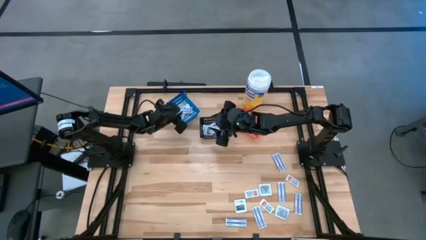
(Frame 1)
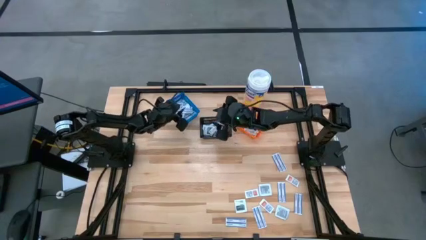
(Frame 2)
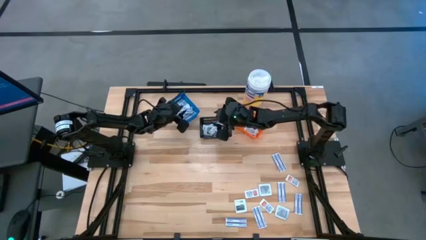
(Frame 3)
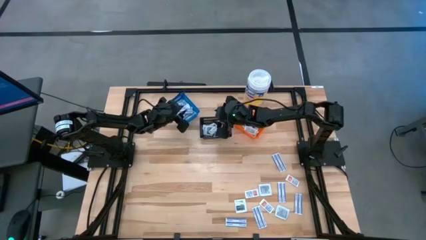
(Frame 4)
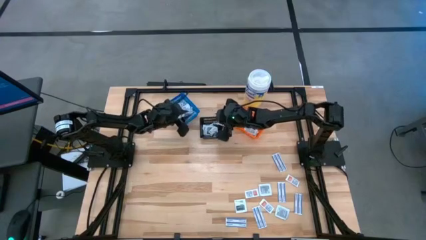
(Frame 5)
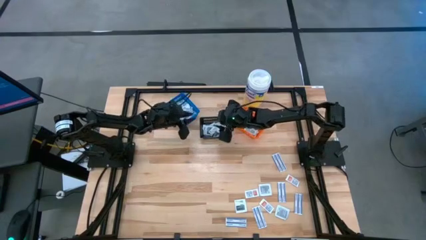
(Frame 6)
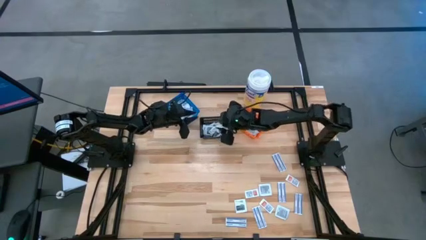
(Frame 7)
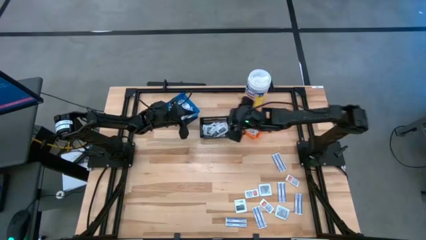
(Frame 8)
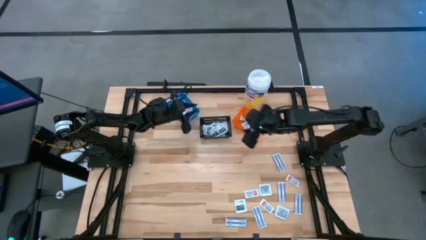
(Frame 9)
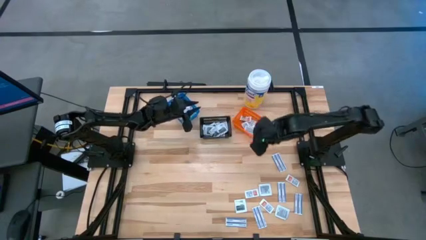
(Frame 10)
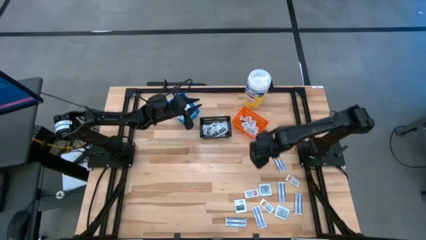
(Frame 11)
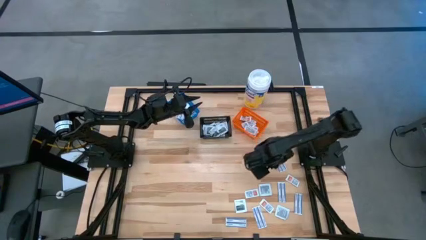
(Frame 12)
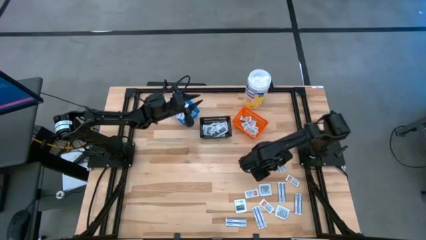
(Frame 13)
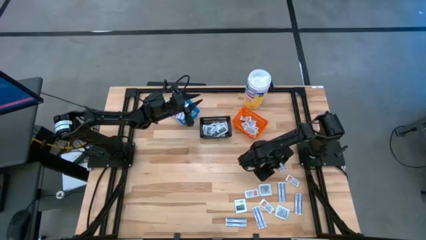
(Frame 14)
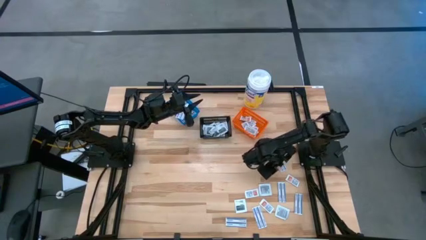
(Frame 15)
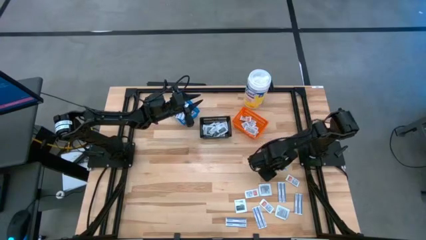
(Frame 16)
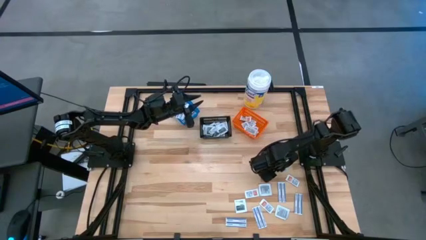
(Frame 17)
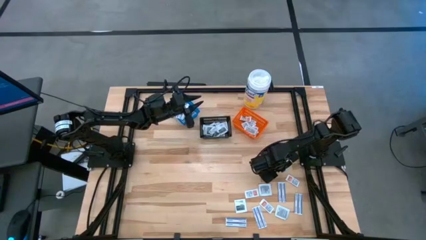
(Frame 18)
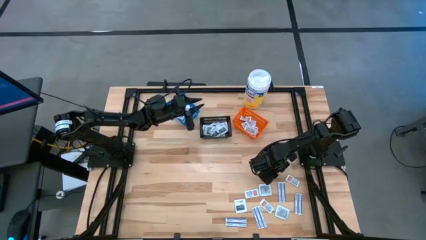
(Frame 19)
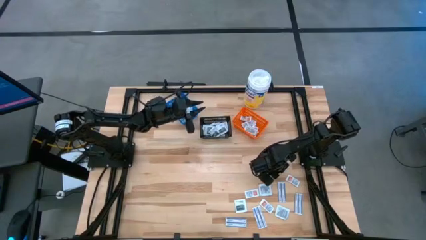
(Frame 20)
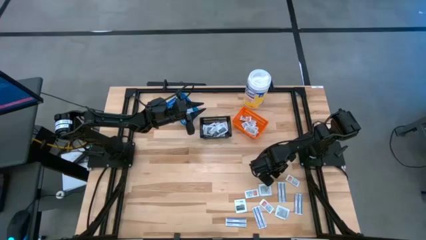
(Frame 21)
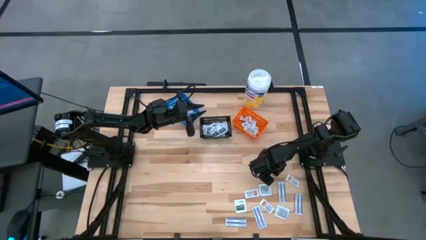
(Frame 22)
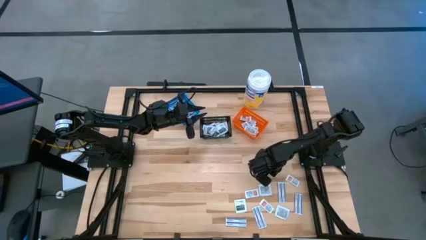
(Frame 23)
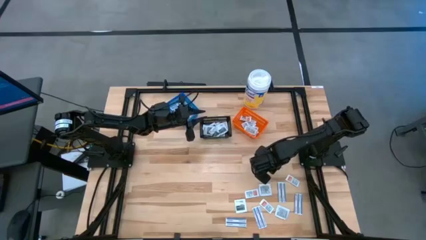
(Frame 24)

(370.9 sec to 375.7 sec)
Task: Pick & Place First Aid Supplies
Put the bandage into the blue container

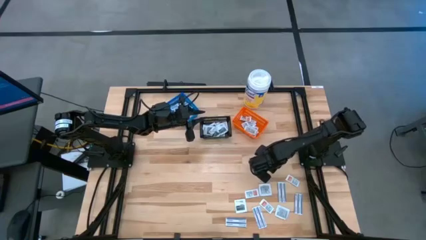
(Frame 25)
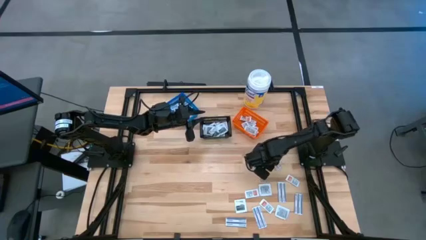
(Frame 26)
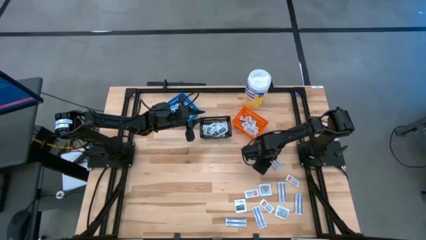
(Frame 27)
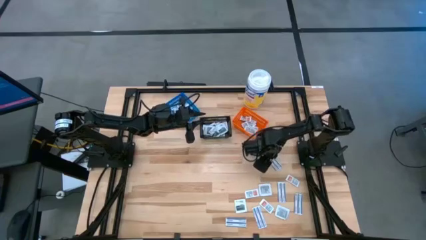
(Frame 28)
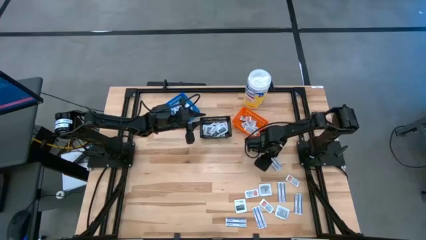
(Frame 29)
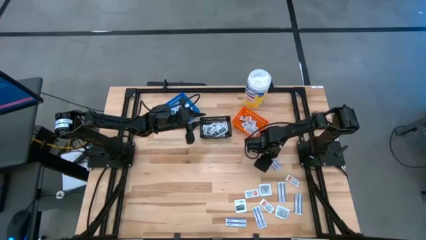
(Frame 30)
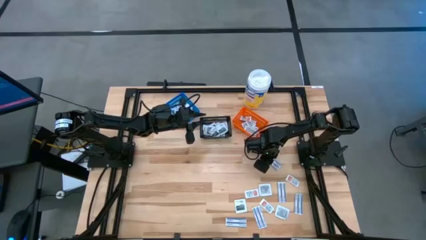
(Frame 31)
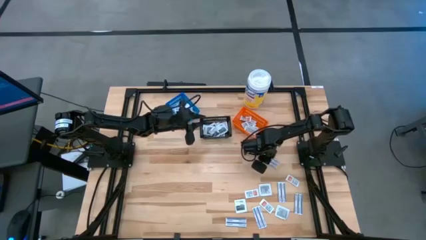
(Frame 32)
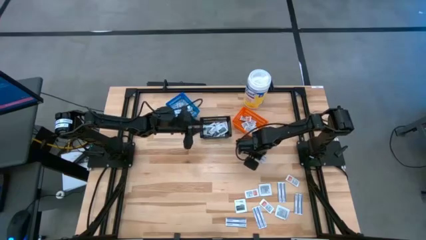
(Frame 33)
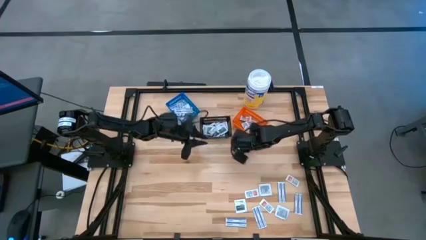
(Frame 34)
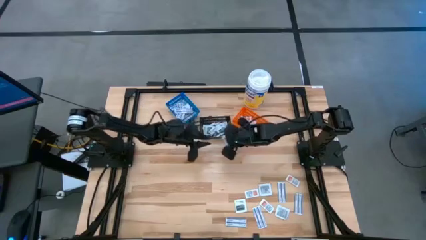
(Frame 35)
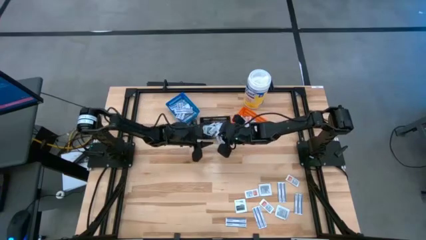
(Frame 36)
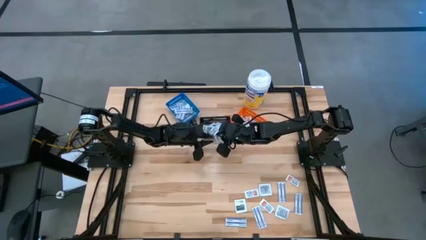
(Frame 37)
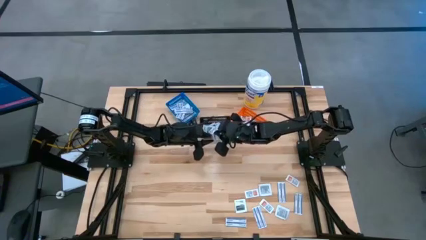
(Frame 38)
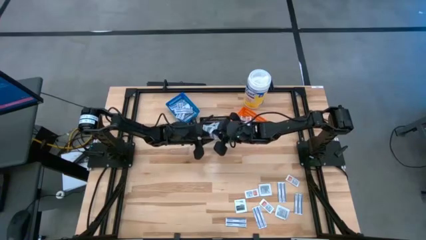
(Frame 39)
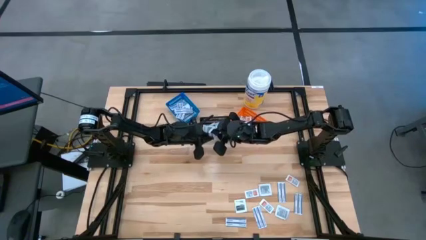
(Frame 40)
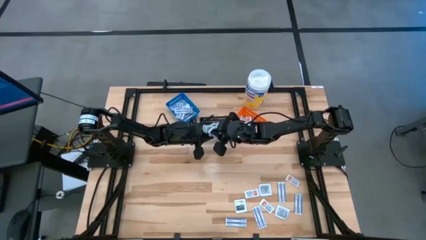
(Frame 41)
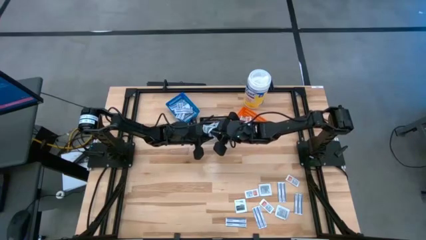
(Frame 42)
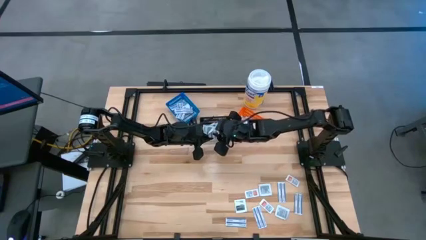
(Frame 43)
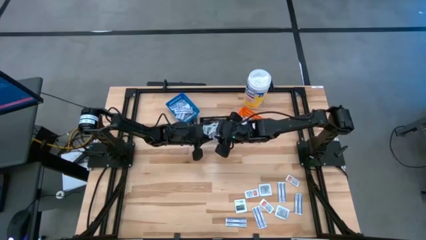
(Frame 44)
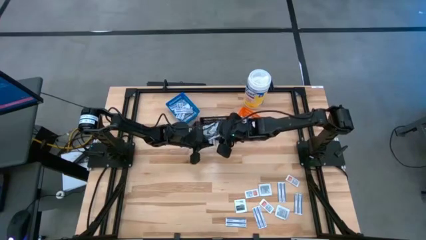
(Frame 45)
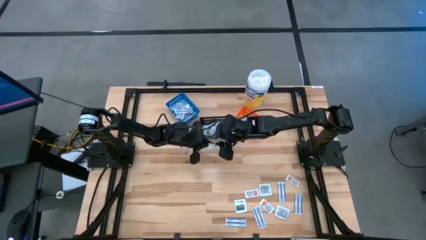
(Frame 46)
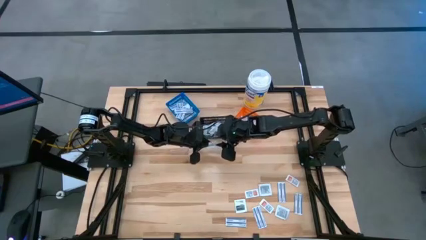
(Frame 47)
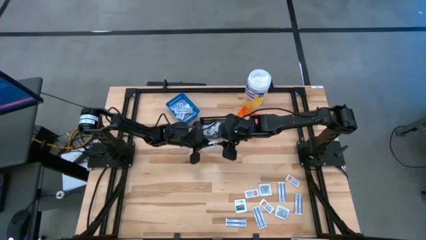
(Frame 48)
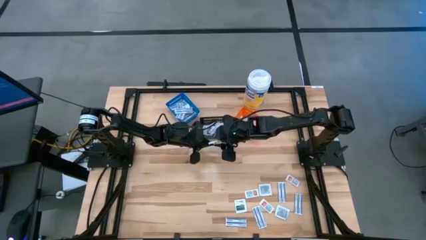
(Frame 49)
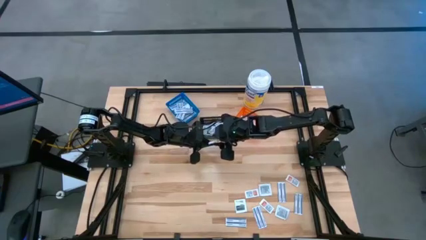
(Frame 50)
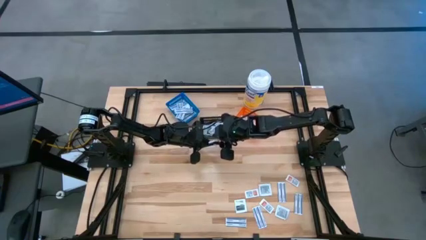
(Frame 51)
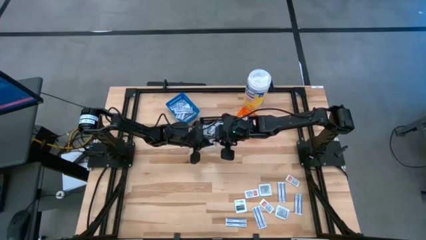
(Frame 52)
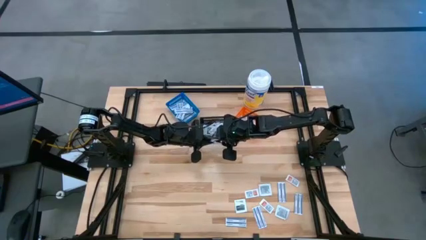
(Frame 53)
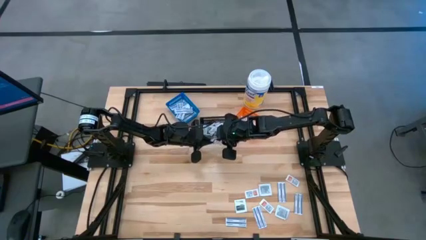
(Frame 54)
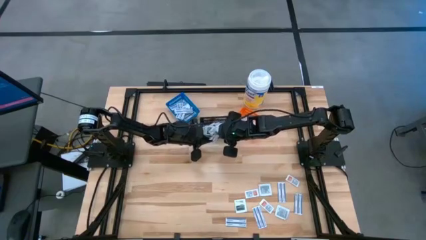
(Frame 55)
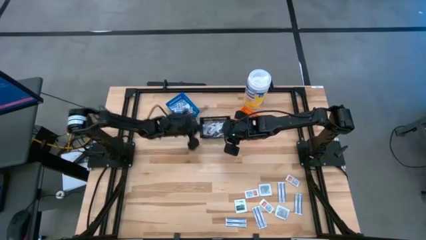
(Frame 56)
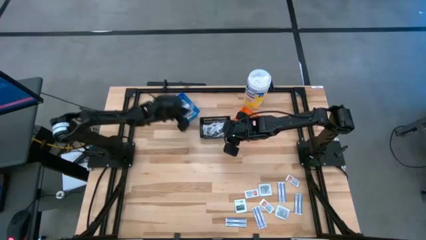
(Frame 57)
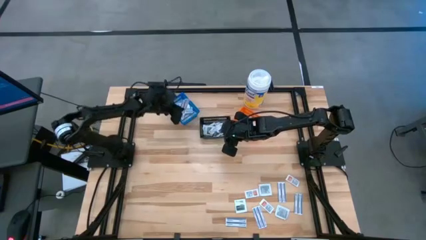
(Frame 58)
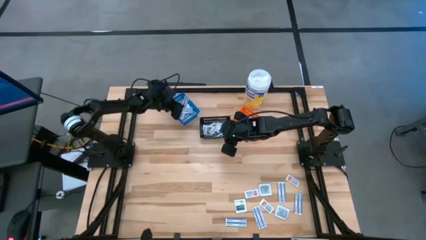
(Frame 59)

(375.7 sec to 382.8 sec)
Put the bandage into the blue container

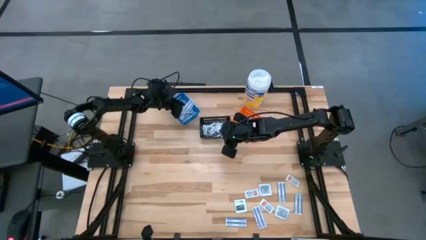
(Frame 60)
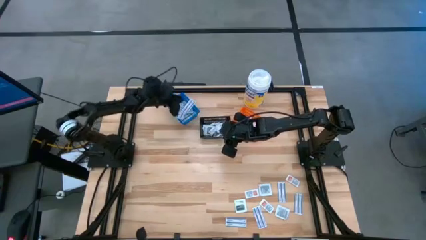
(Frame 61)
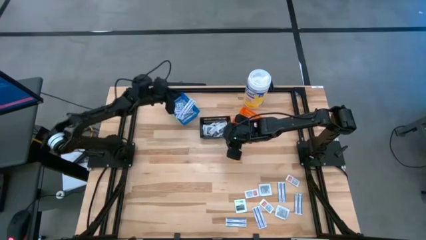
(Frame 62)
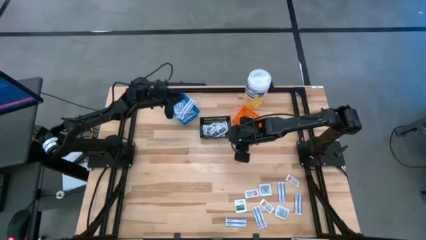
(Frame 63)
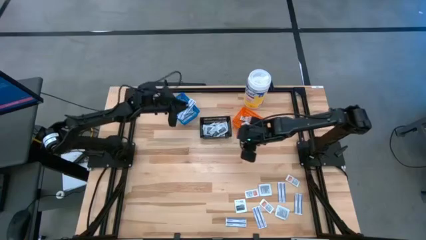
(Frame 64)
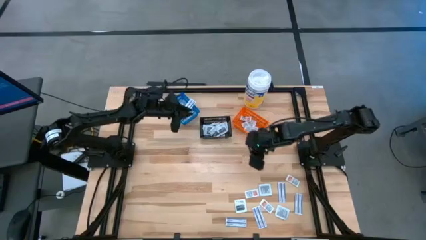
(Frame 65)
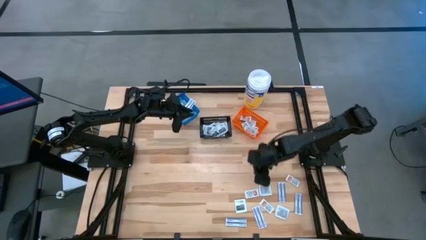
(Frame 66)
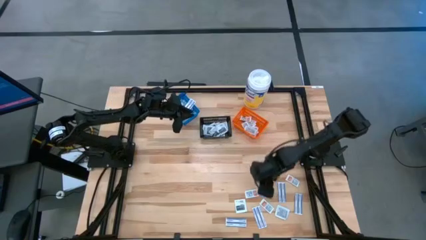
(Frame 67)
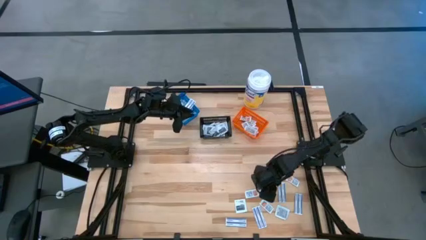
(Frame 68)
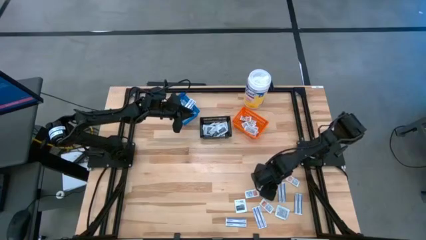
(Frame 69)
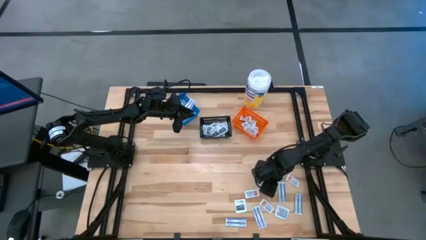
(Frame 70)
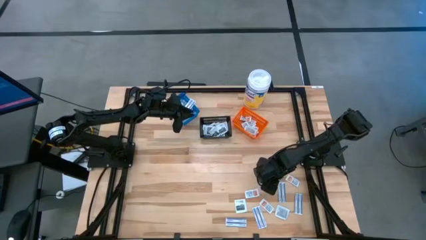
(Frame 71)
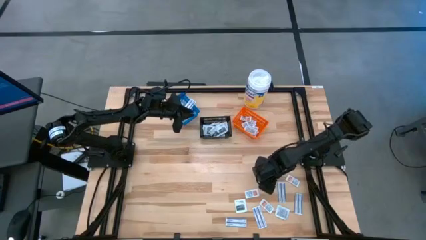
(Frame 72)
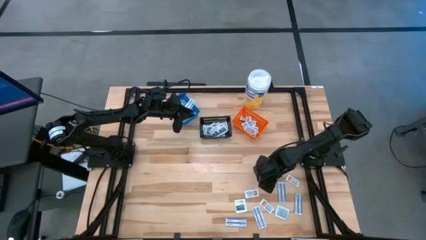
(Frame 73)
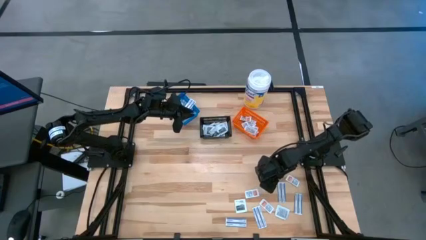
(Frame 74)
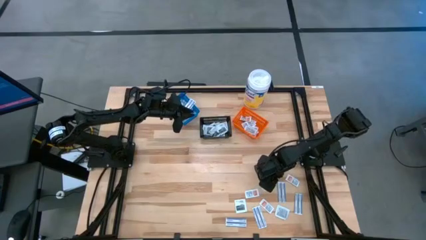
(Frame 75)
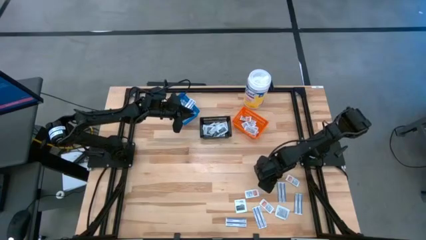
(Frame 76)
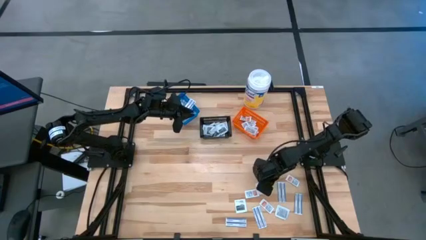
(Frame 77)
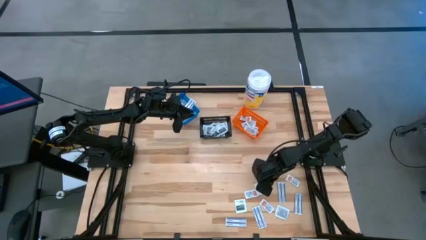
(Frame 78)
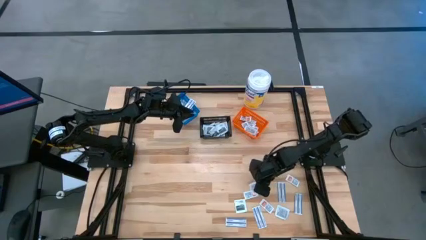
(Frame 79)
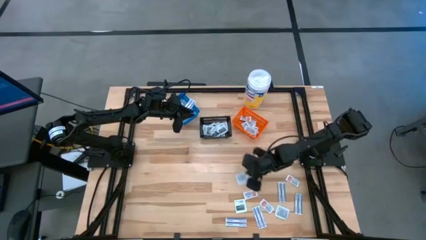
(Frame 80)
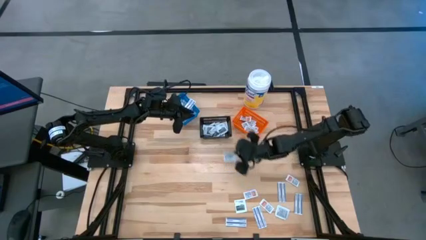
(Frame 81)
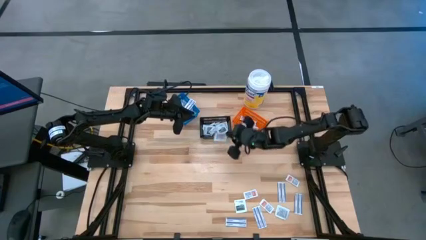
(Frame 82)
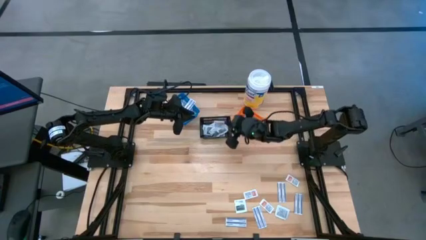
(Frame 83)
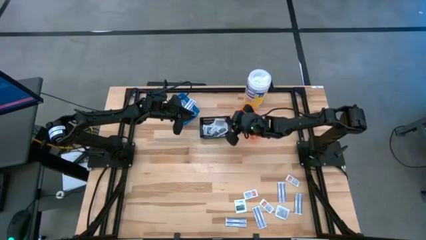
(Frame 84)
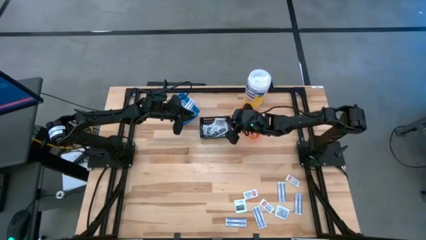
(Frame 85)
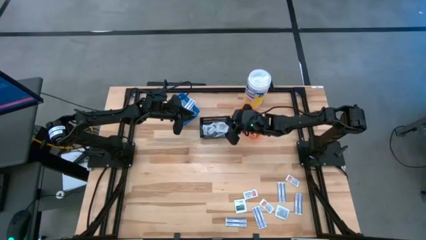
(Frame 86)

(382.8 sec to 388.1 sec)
Put the towelette pack into the black bin
